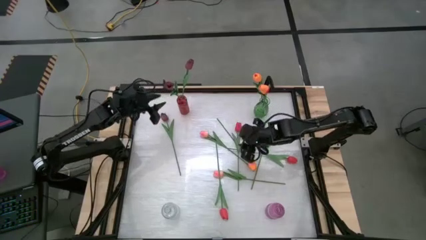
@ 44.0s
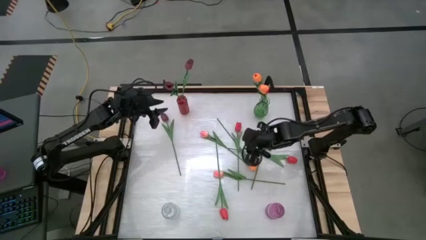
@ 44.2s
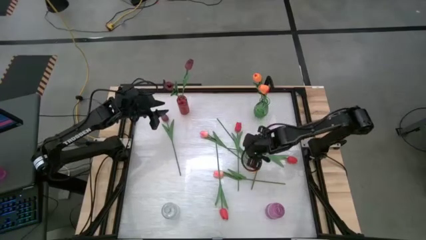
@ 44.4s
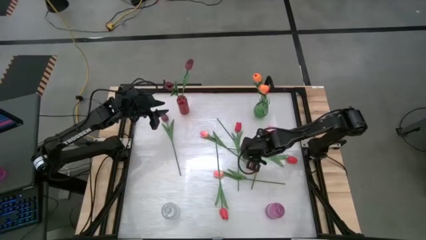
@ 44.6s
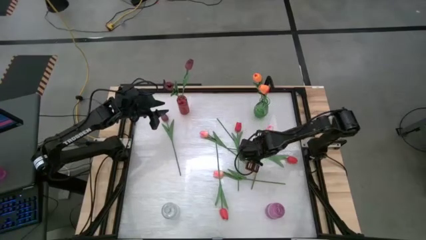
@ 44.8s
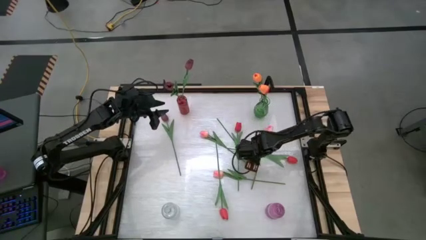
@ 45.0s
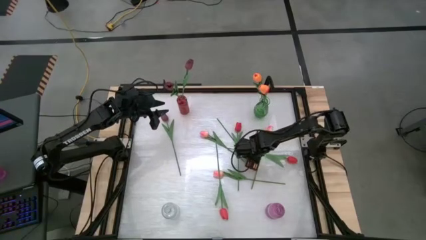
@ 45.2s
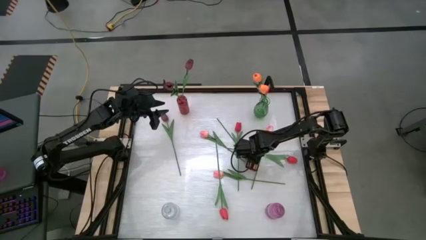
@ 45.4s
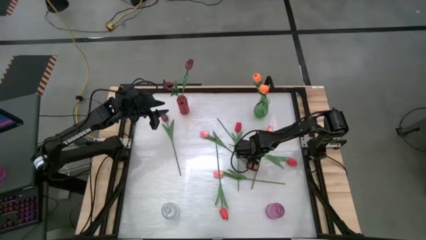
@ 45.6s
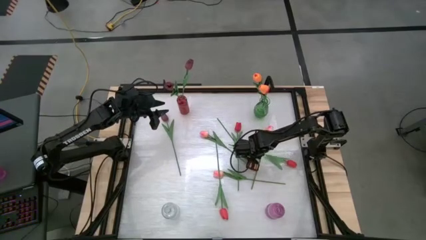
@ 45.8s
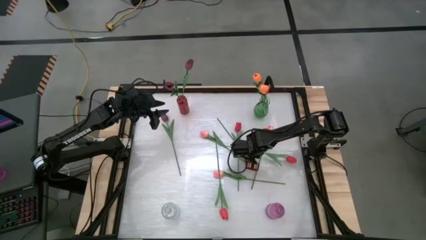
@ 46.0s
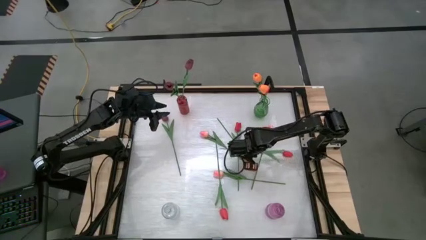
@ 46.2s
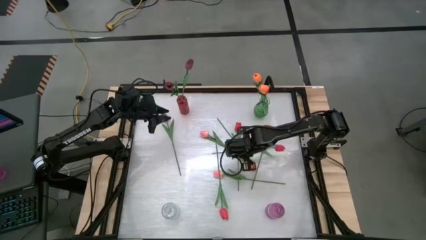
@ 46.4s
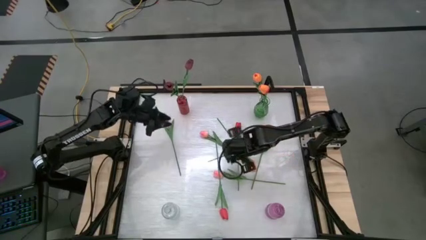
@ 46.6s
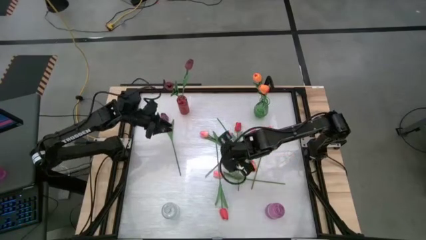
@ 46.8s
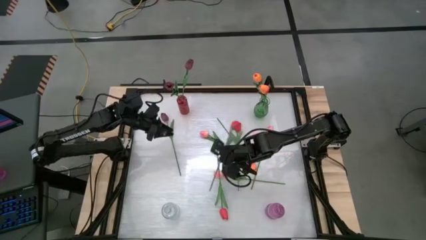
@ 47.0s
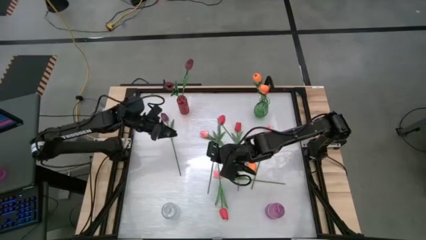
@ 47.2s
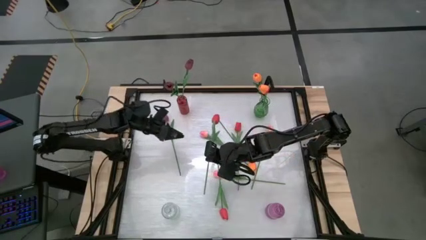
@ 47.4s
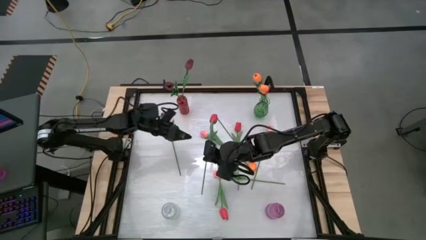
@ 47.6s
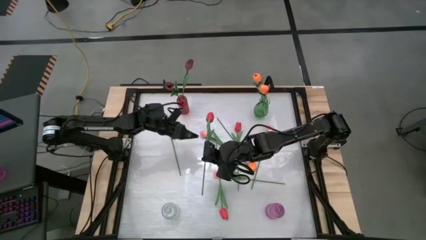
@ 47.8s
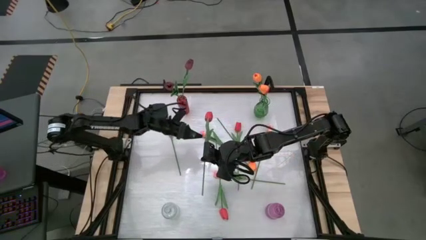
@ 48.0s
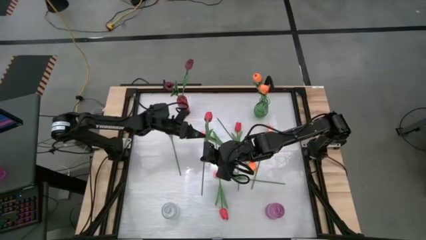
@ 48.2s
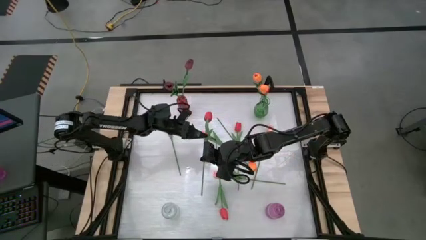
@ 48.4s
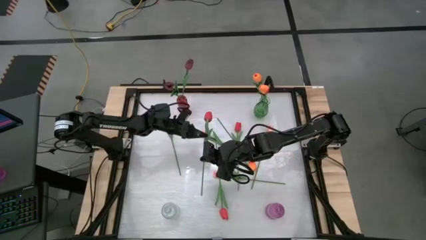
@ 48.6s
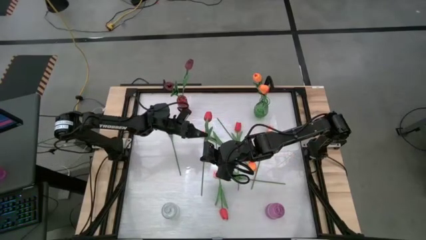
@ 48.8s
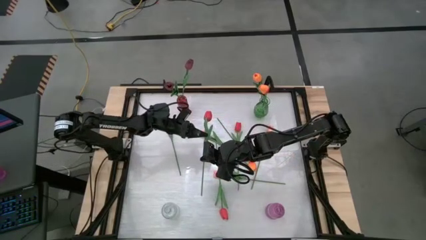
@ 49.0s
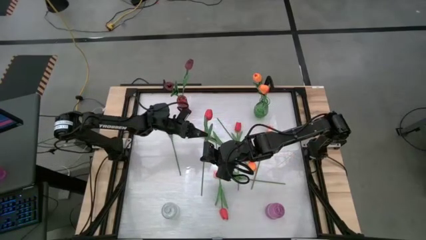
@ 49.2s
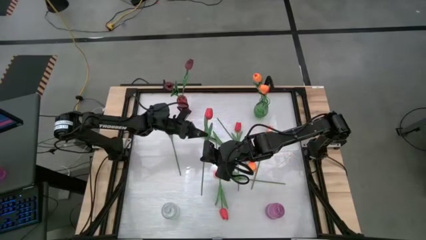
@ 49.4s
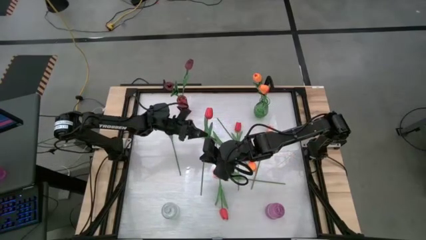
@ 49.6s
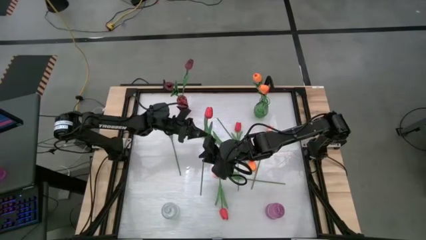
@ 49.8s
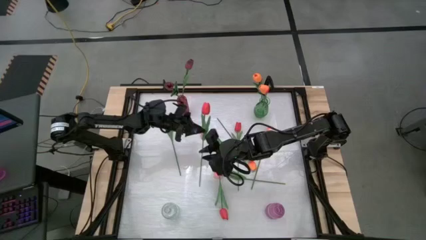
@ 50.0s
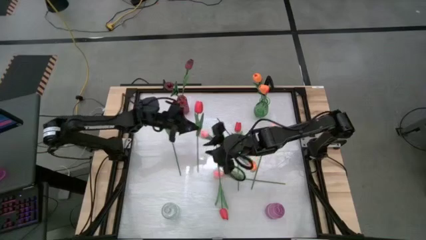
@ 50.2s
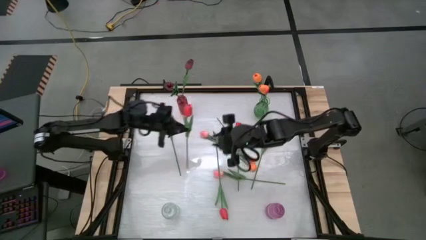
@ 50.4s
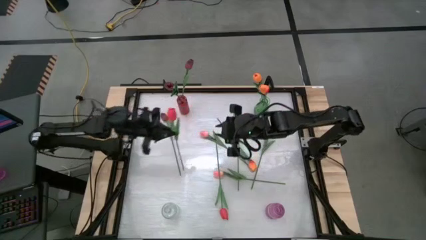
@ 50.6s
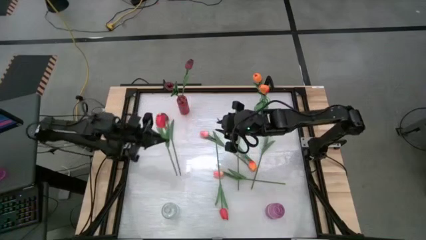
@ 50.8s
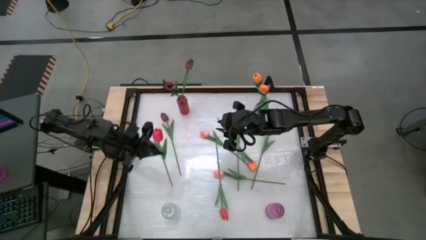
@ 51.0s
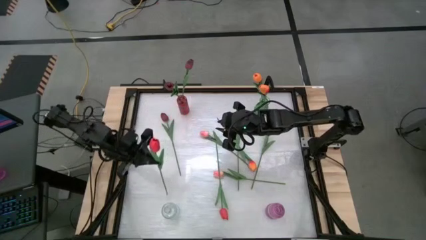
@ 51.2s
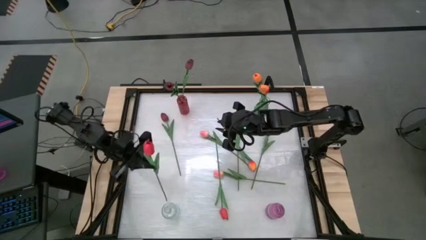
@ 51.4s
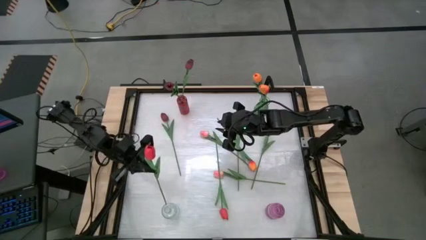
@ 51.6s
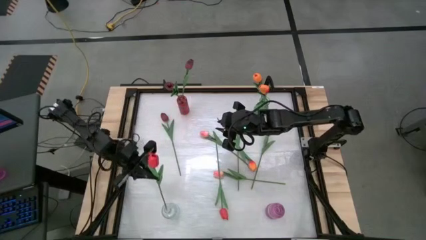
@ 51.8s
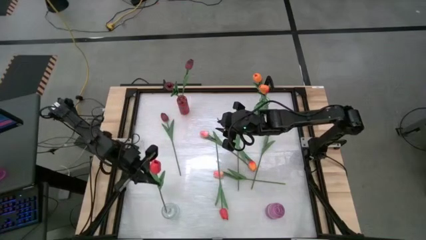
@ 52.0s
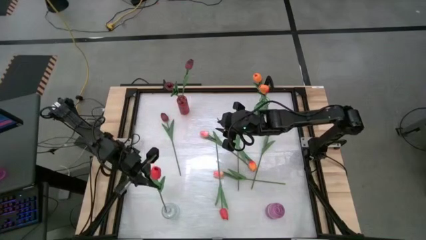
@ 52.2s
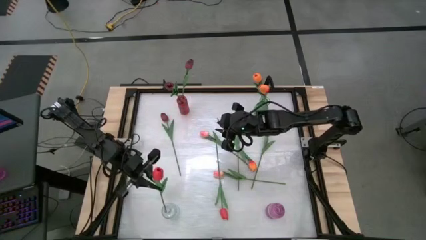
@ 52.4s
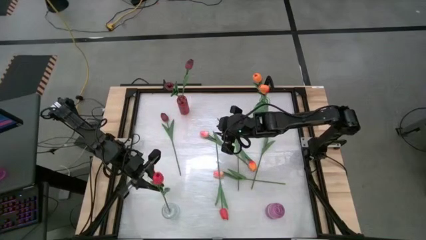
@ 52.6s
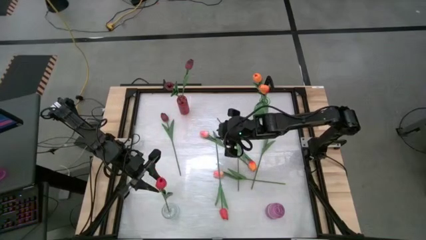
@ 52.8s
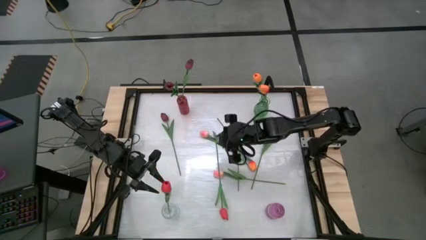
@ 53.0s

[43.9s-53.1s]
Task: Sort flowers into vase by color
Put the red flower into the transparent vase

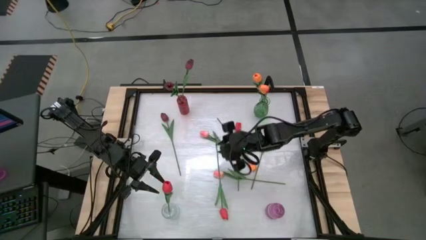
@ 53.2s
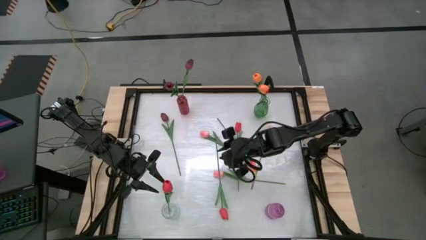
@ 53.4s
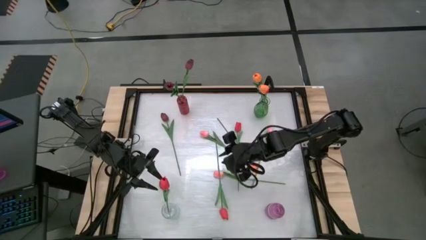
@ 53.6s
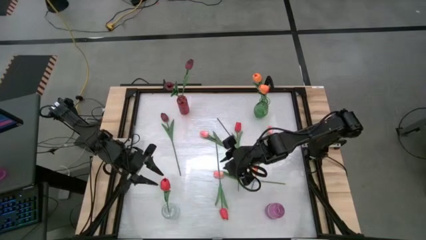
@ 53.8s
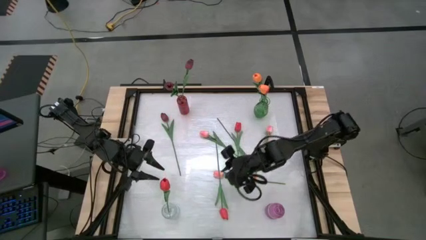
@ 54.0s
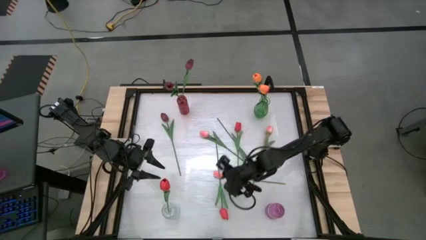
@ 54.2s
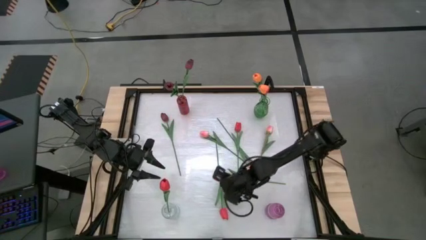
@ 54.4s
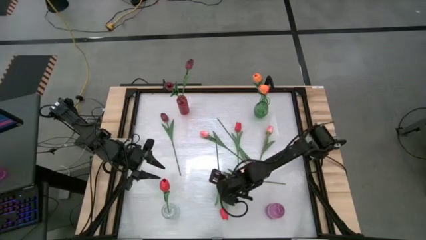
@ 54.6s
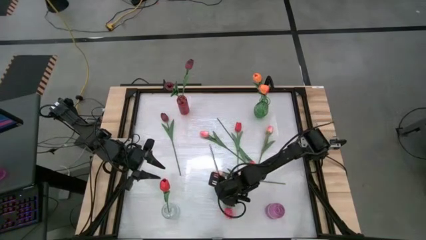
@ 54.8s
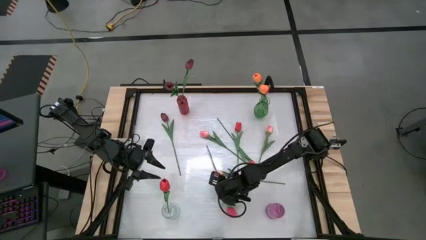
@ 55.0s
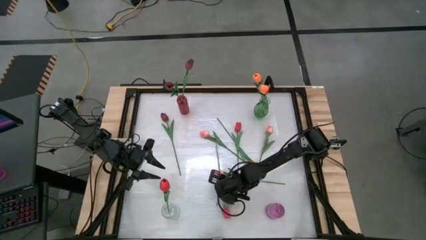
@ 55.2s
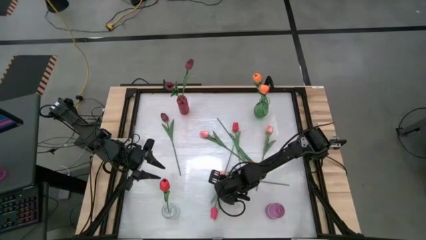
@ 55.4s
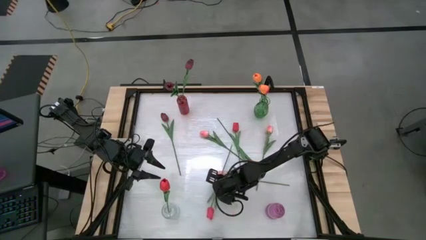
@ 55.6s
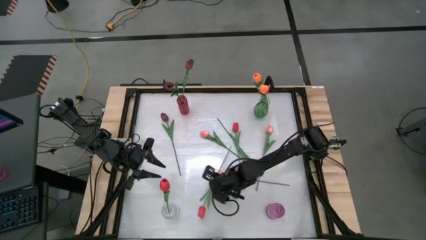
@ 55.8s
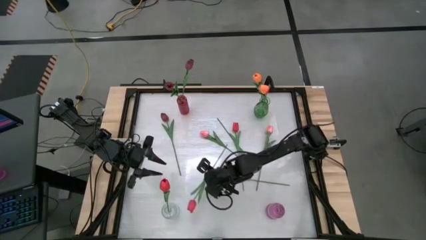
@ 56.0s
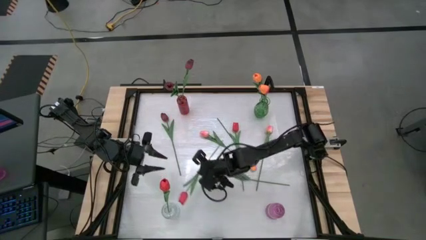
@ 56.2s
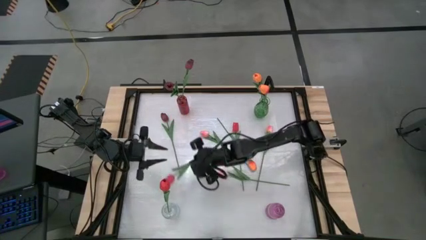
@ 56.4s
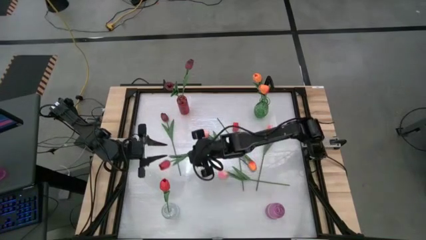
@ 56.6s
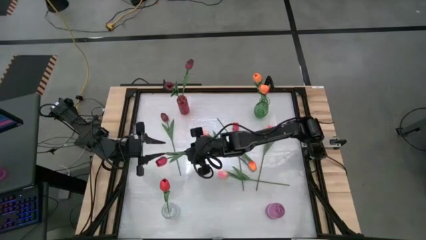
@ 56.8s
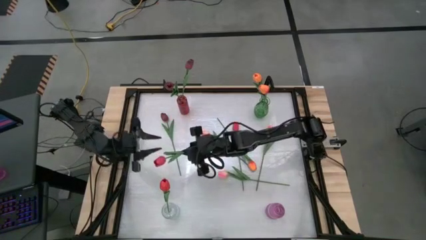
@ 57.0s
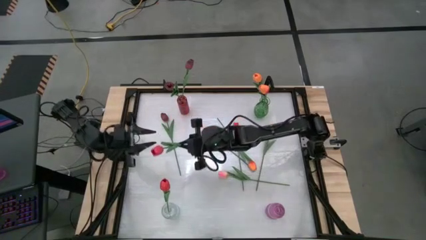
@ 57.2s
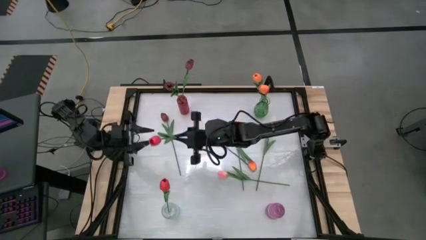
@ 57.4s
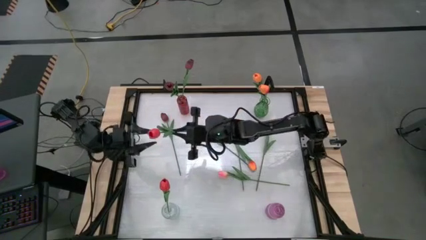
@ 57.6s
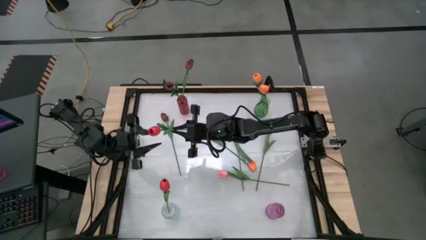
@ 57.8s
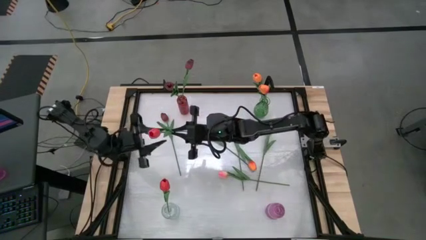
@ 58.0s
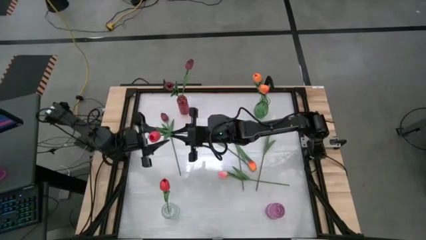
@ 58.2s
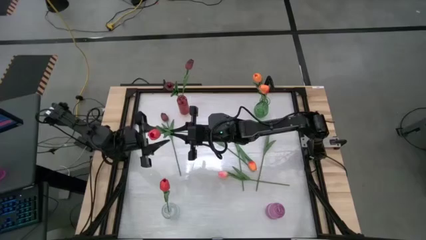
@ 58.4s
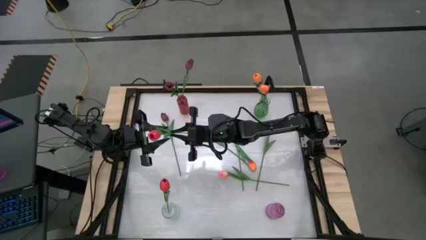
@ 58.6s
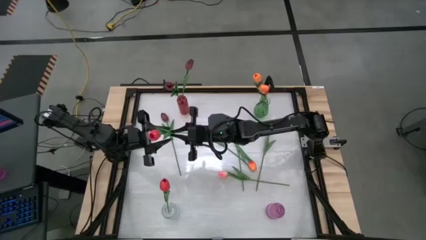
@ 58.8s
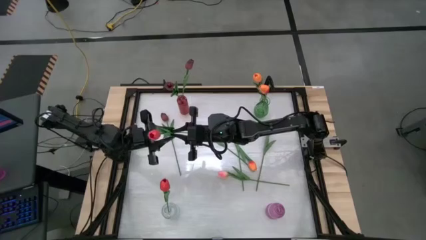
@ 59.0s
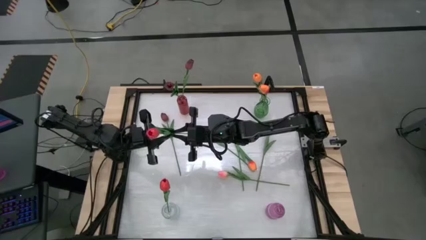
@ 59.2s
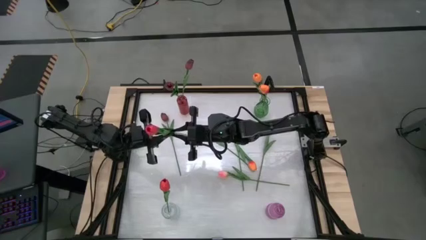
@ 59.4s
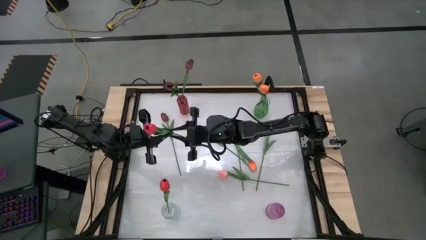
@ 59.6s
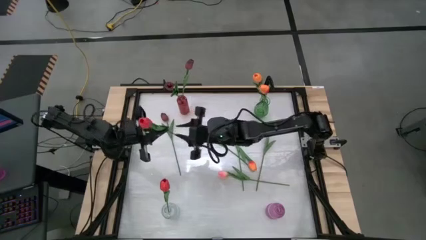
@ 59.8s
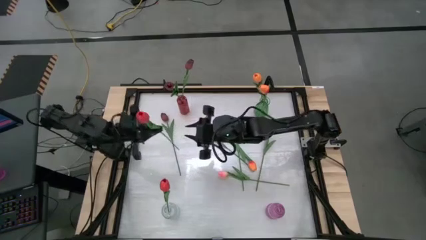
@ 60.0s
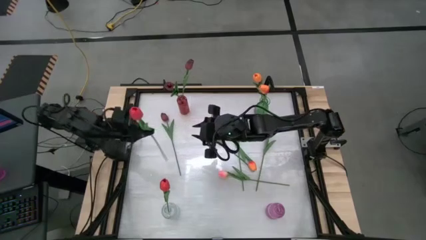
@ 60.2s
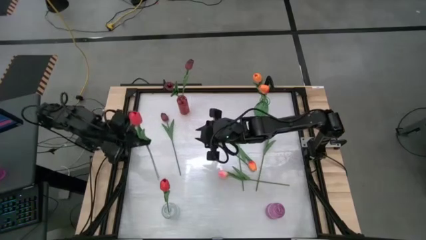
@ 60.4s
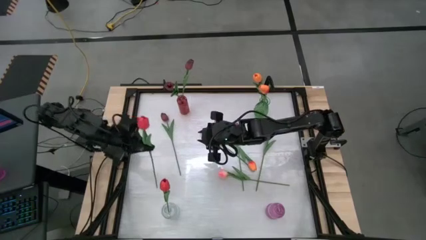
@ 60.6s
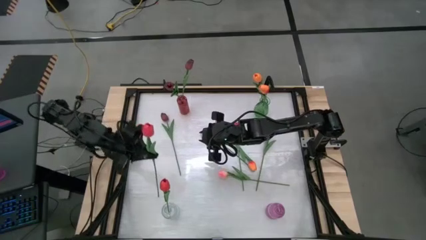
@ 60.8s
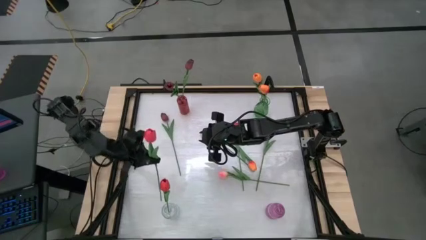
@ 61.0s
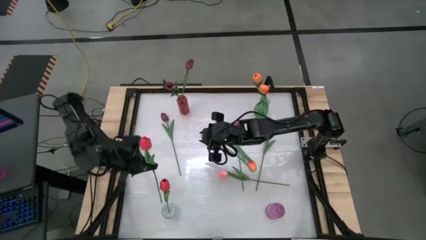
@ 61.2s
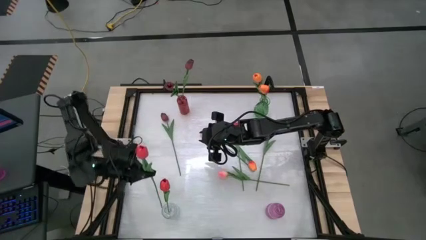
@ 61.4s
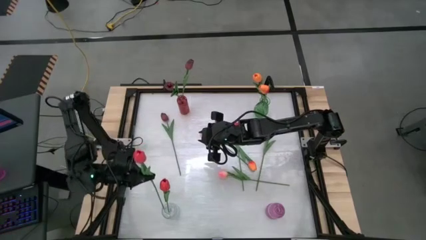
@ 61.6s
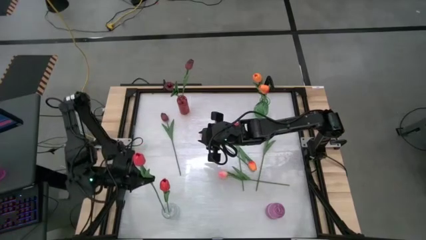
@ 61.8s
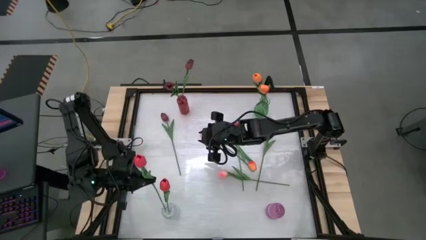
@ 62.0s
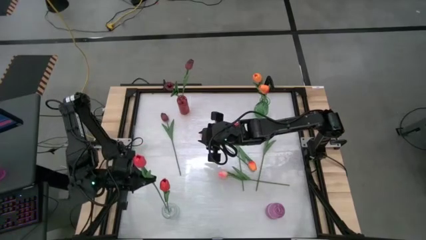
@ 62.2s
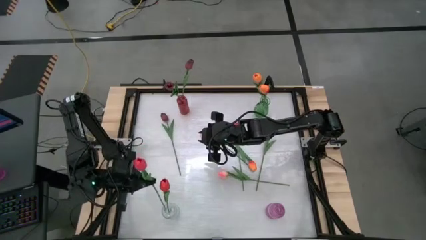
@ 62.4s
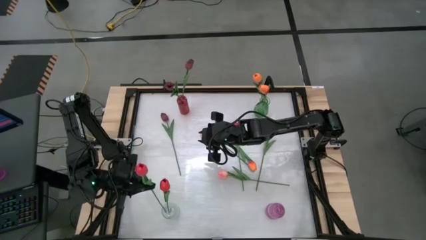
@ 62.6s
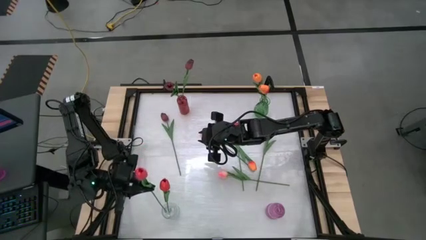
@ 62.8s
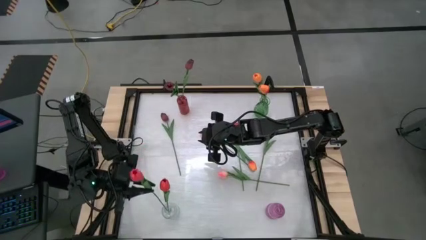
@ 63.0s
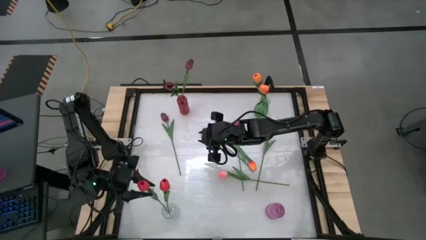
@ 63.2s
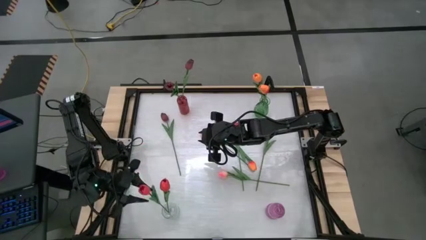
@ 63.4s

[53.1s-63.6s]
Put the red flower into the transparent vase
